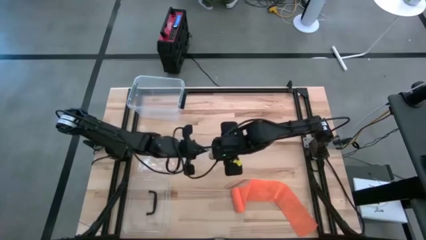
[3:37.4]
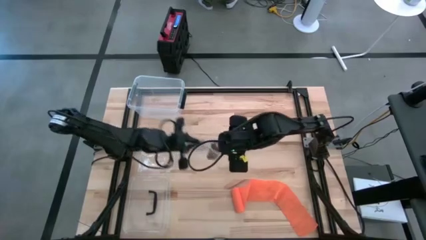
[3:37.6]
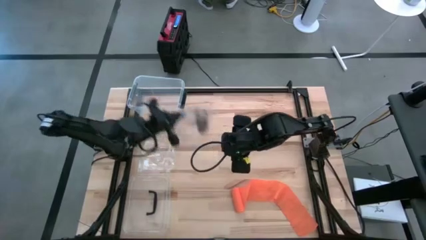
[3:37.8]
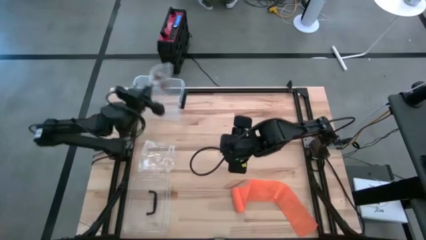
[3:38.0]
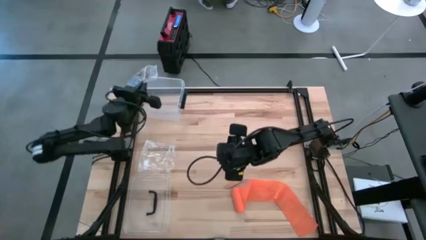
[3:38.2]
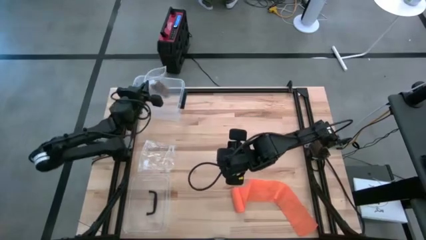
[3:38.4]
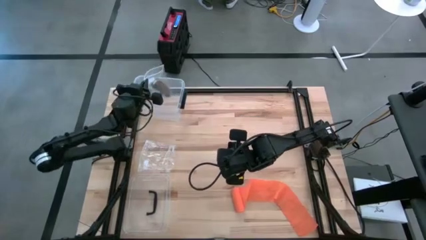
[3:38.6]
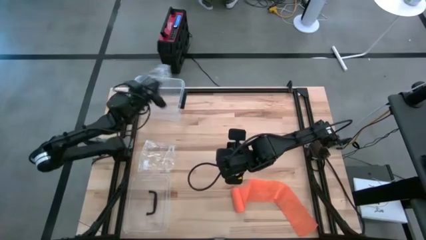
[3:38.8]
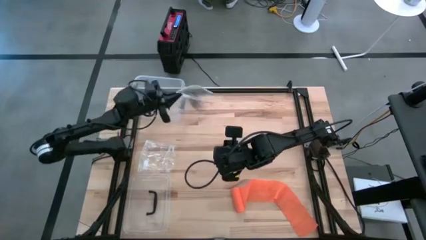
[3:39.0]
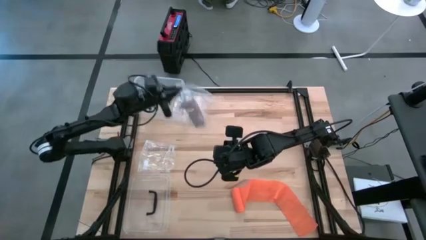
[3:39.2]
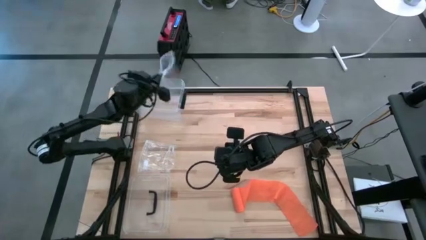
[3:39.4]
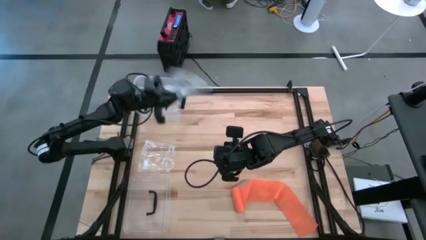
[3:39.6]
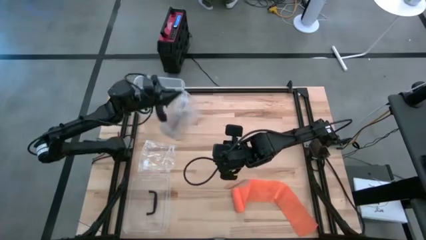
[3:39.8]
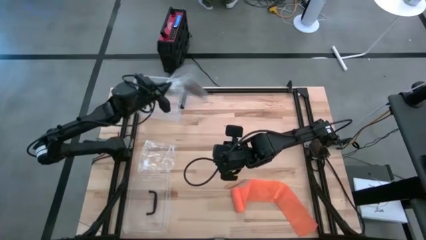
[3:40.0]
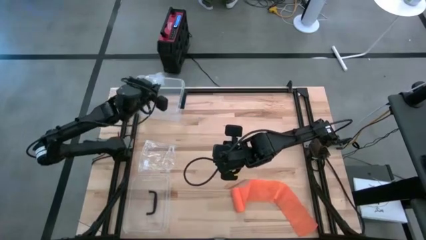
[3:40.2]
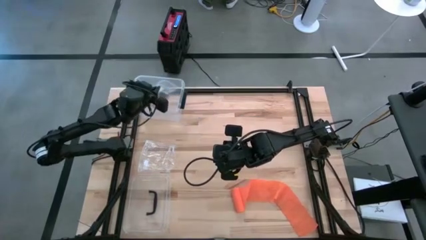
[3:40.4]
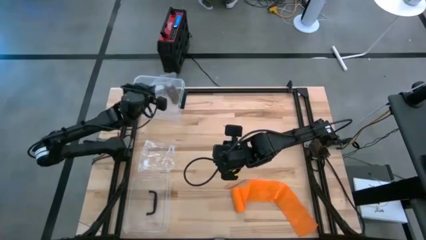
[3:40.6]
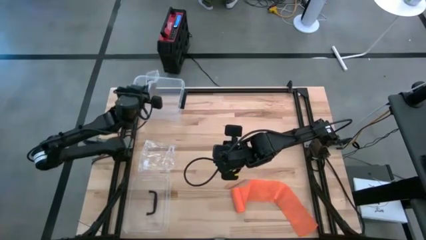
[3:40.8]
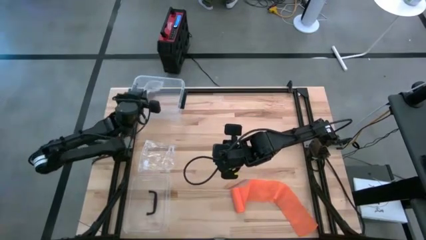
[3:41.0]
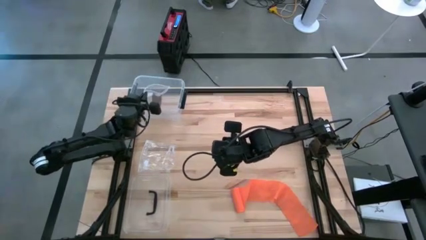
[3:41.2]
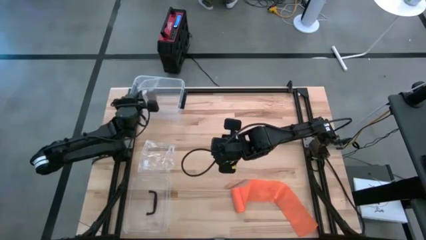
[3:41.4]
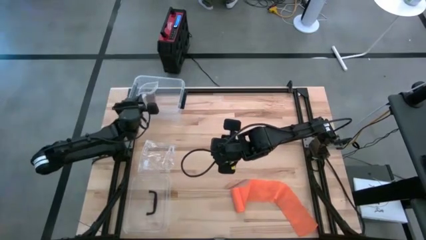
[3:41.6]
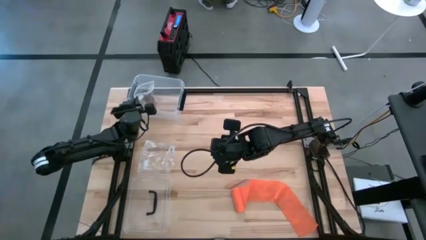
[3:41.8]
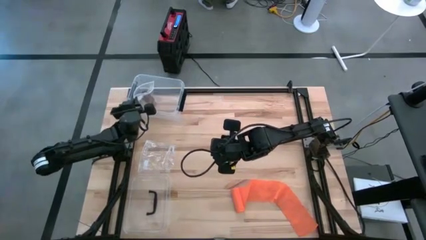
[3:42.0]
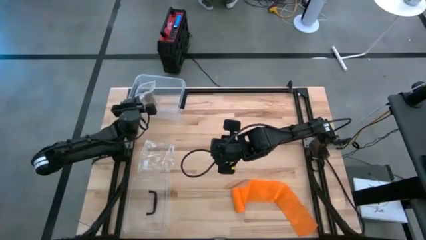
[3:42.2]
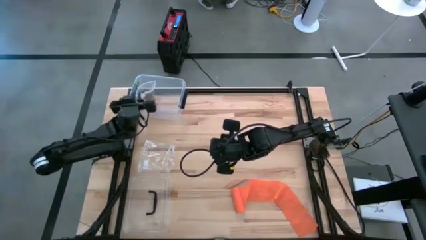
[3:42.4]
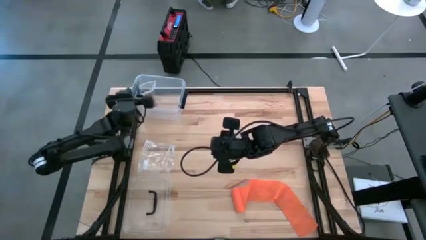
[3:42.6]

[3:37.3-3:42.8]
Task: Roll bandage
Put the packed brown bandage towel into the transparent storage bin

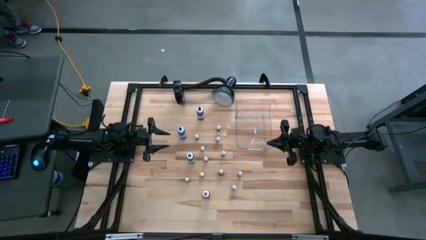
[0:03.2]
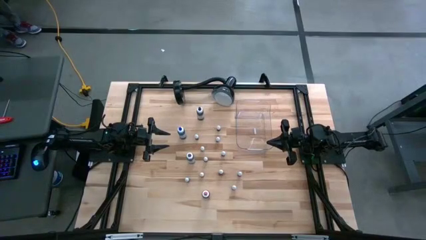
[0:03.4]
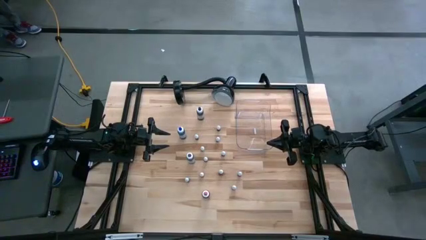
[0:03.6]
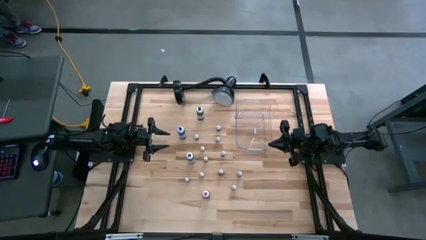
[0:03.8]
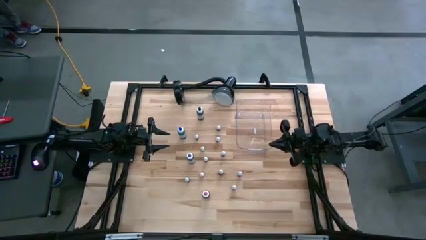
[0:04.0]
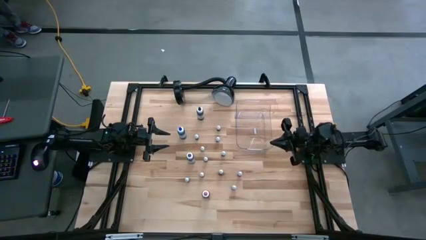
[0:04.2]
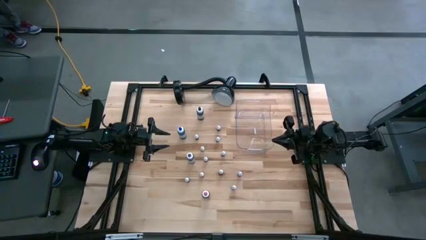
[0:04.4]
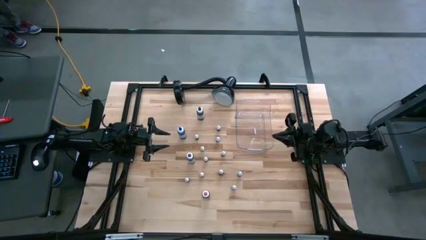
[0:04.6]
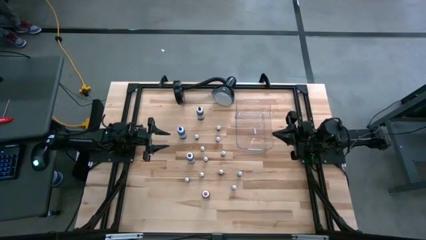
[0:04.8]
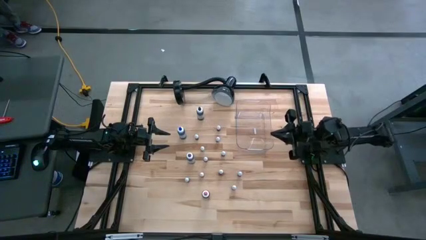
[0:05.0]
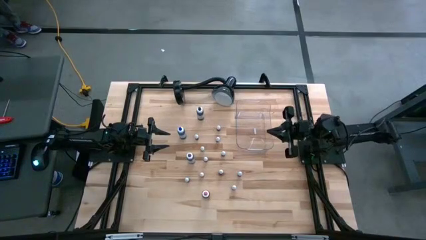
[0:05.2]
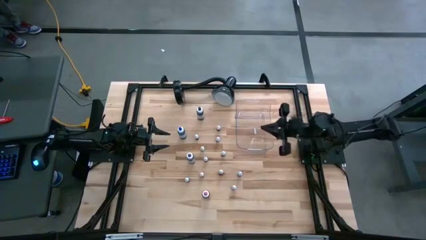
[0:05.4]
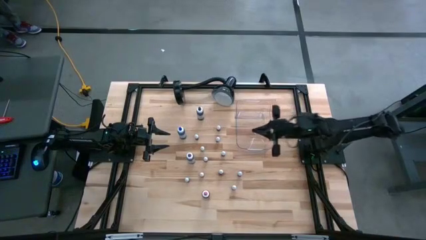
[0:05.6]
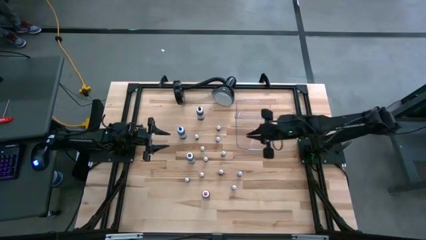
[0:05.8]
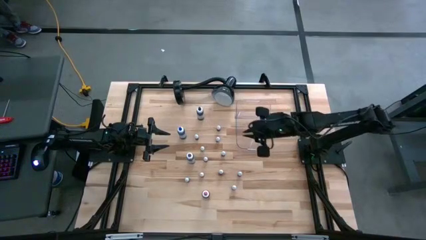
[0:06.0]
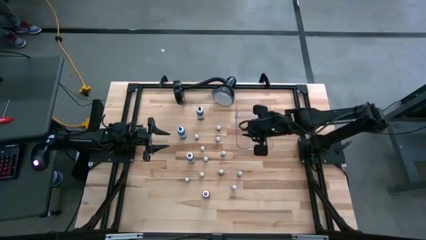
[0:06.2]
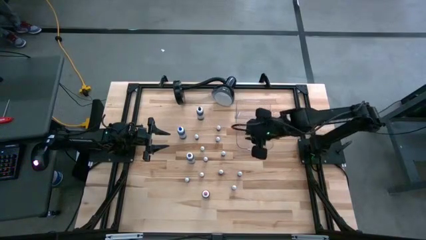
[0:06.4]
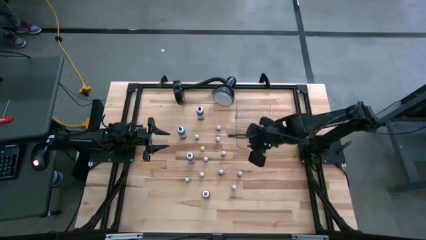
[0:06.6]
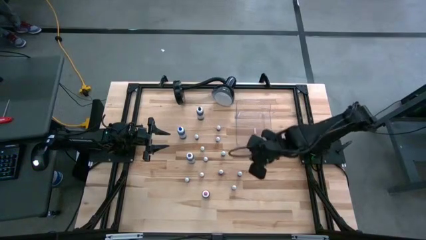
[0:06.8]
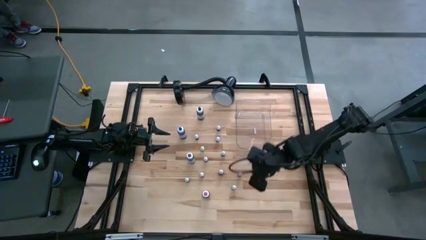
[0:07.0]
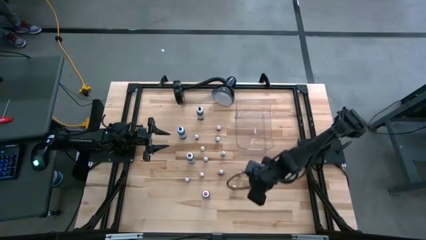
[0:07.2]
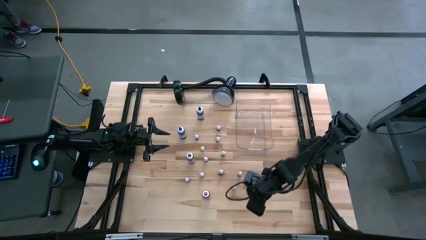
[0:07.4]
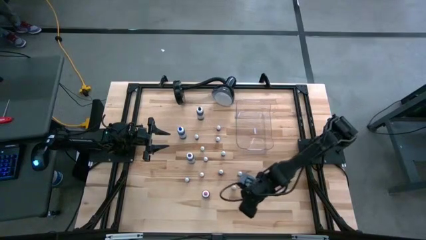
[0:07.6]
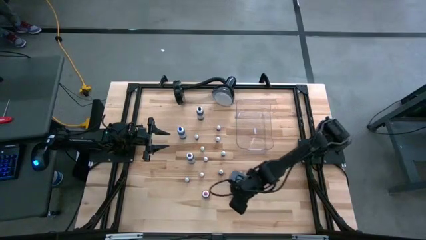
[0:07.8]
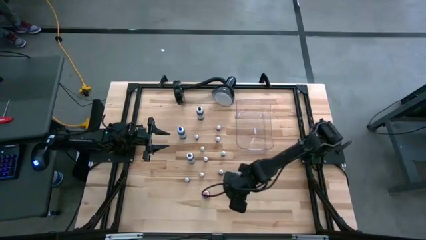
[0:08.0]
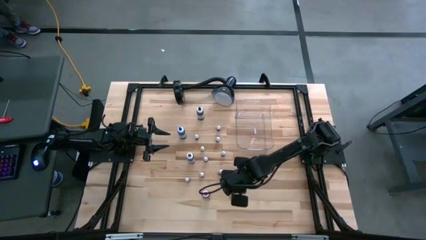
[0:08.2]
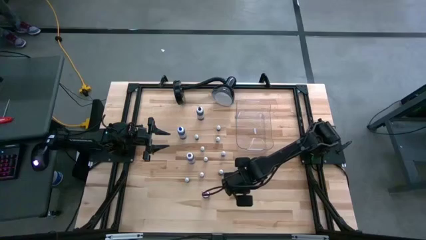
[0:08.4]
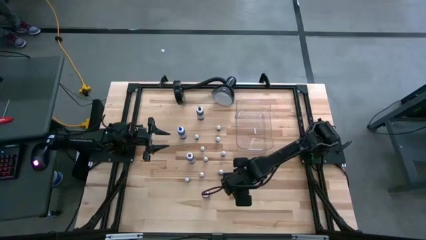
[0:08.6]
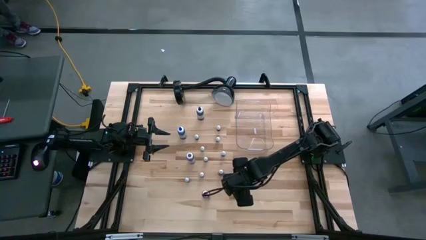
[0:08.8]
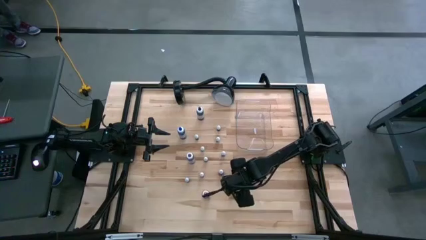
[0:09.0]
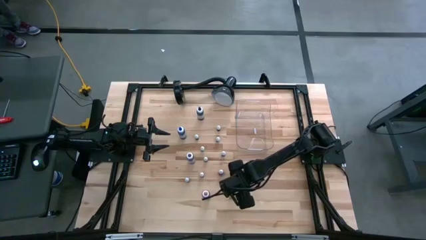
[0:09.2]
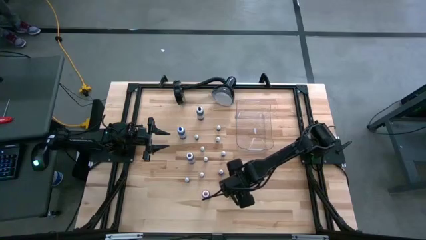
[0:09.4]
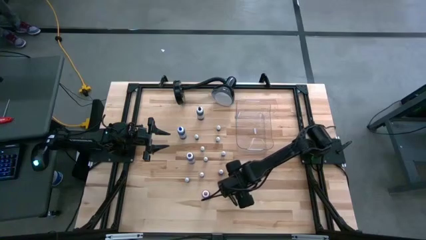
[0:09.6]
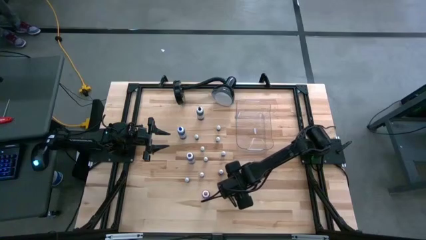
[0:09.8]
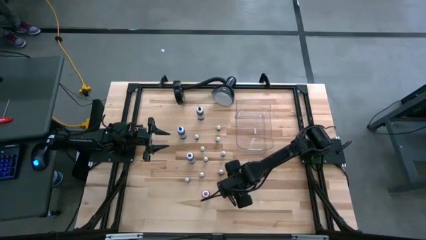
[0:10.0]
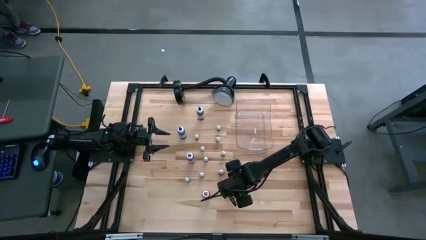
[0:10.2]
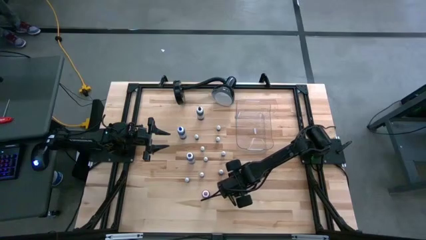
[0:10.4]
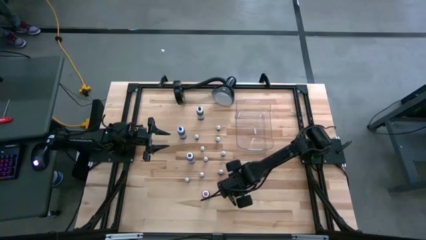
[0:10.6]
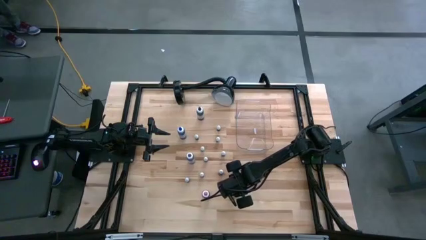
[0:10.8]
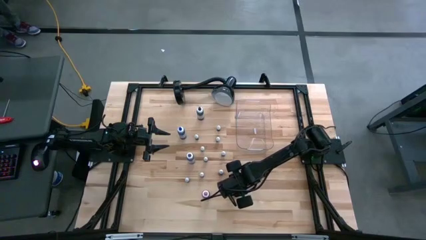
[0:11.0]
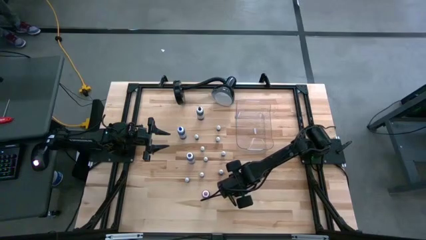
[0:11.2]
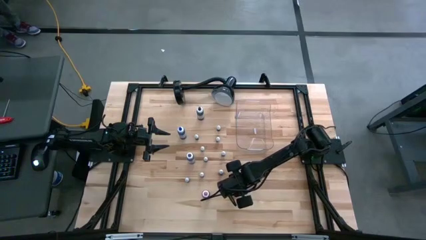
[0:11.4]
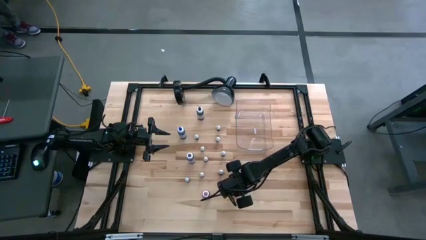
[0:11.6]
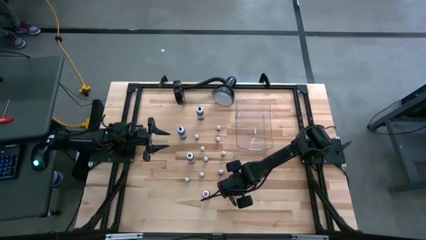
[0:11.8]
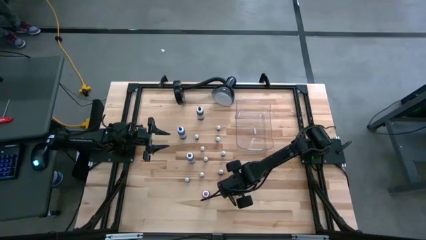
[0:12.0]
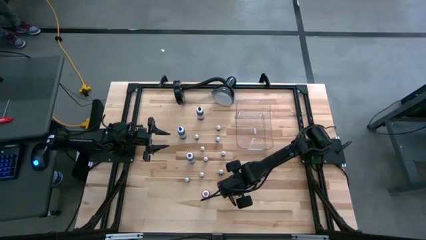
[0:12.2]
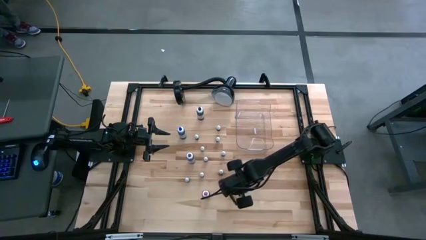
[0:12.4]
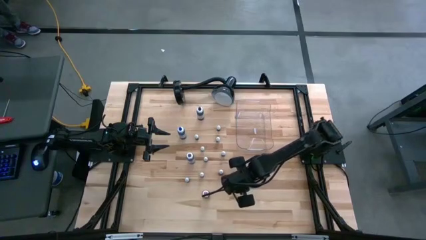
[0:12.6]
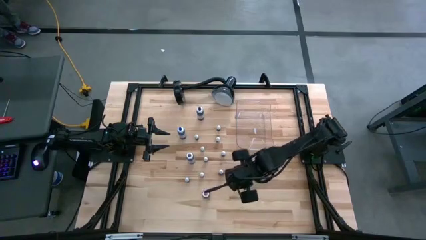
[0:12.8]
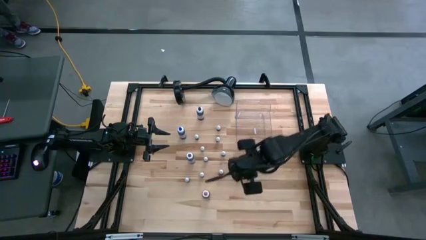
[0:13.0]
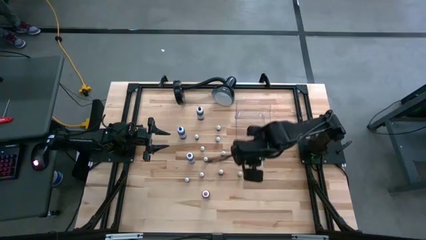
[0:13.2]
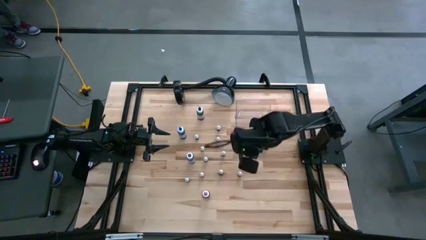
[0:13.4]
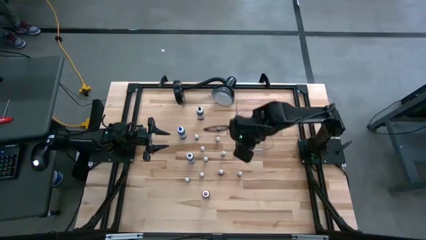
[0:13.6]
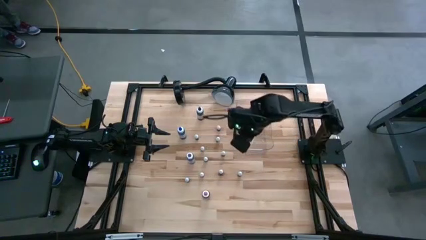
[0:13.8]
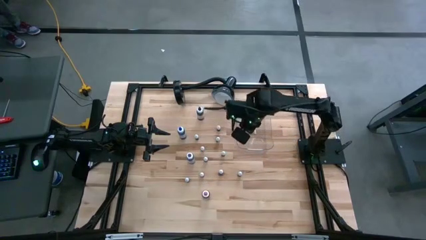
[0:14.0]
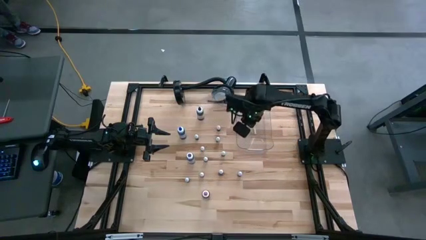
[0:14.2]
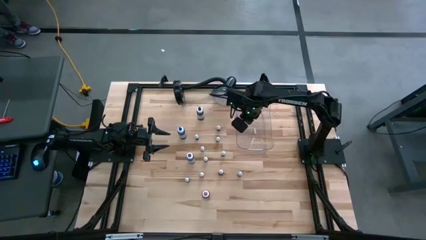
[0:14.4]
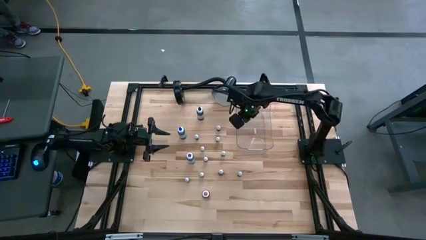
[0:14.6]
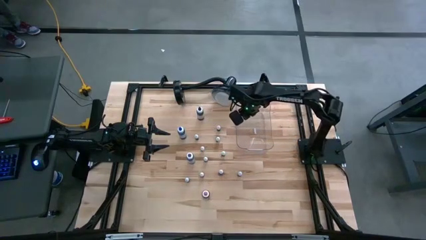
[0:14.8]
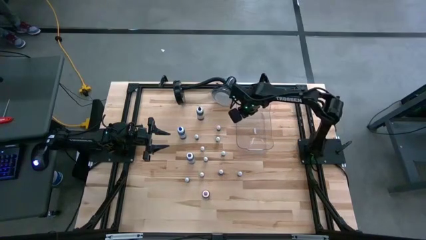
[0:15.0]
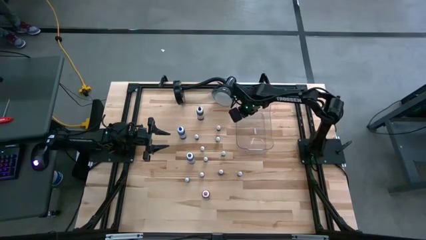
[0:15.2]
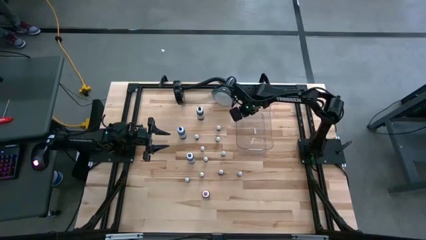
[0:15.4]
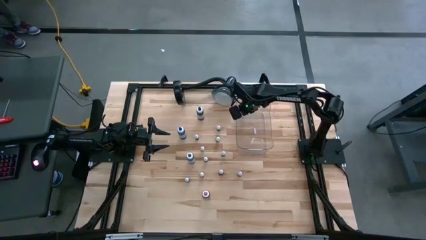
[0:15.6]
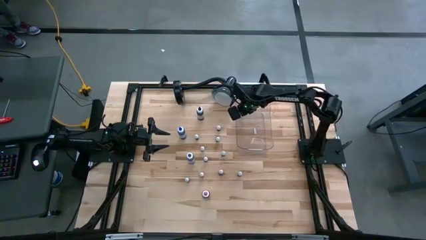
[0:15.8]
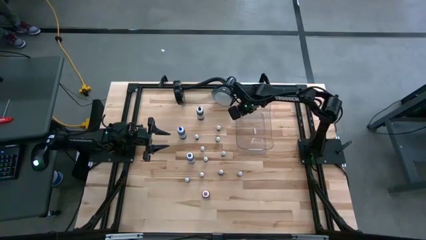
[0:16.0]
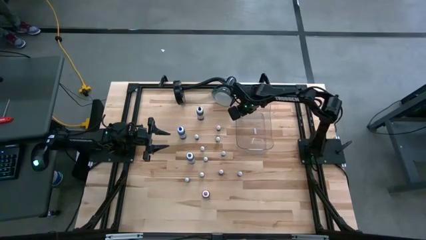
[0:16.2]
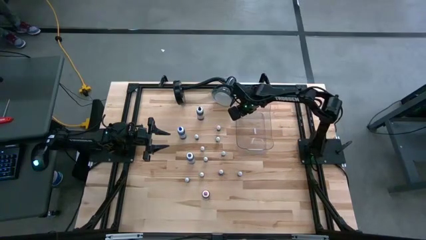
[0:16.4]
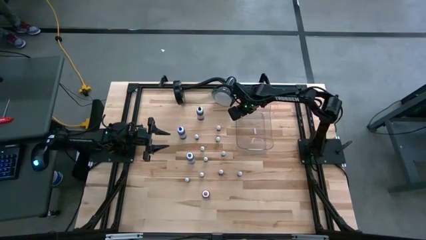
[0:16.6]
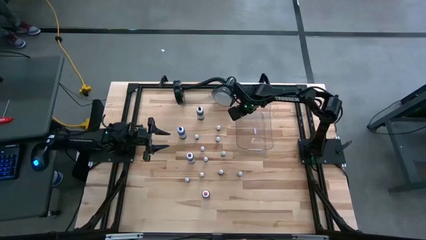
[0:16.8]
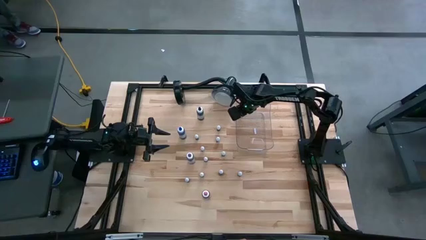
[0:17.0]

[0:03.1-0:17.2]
Task: Pick & Place food coloring
Put the small red food coloring bottle into the transparent bin
